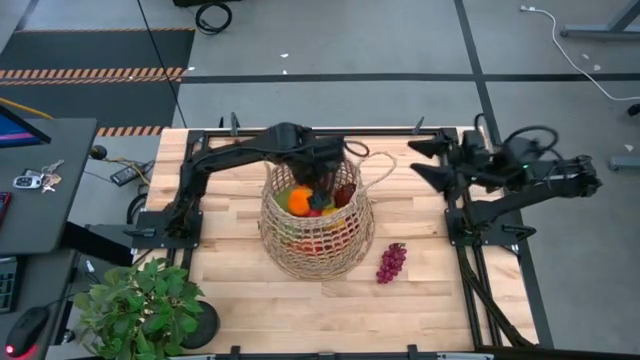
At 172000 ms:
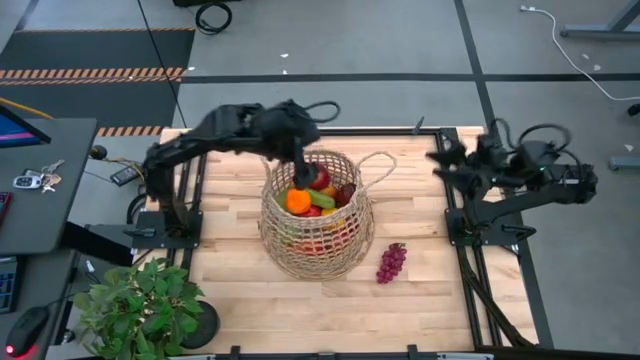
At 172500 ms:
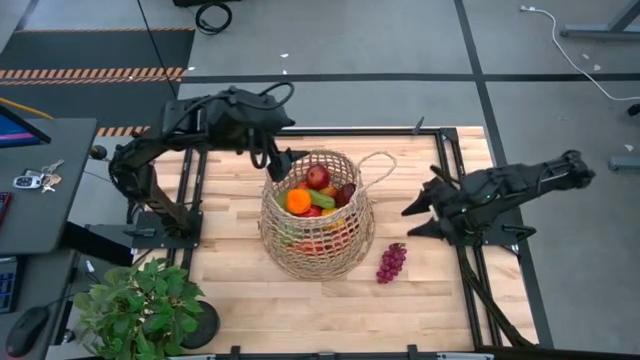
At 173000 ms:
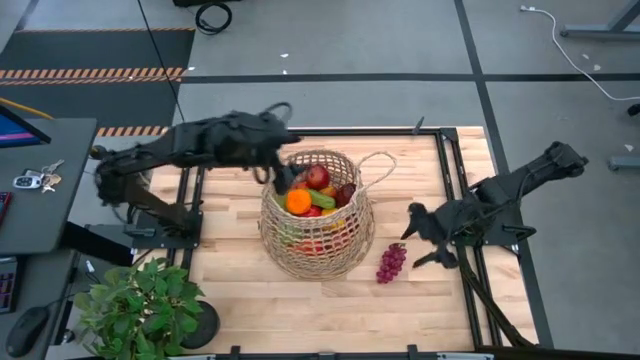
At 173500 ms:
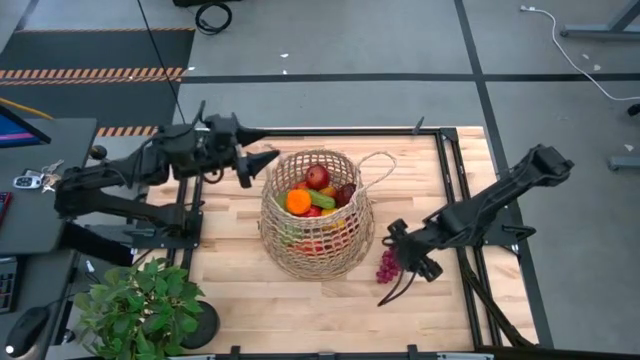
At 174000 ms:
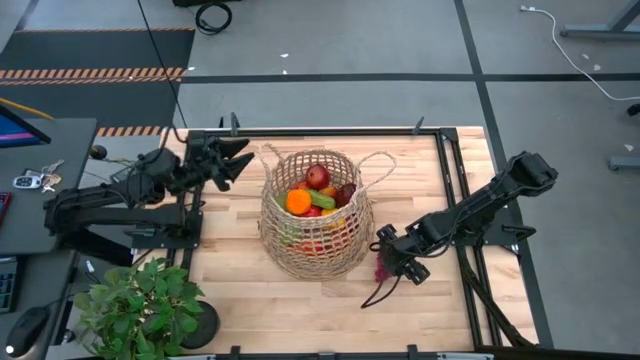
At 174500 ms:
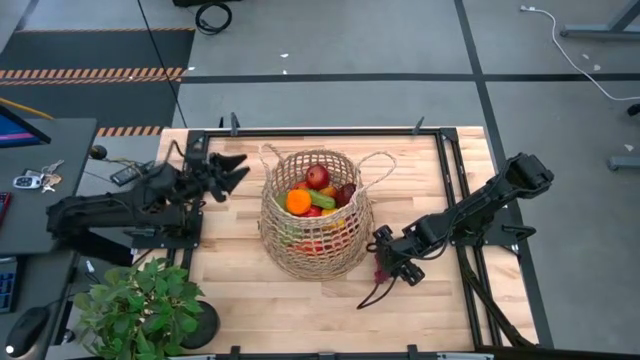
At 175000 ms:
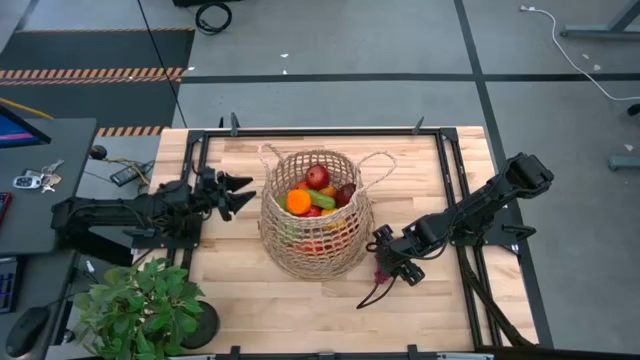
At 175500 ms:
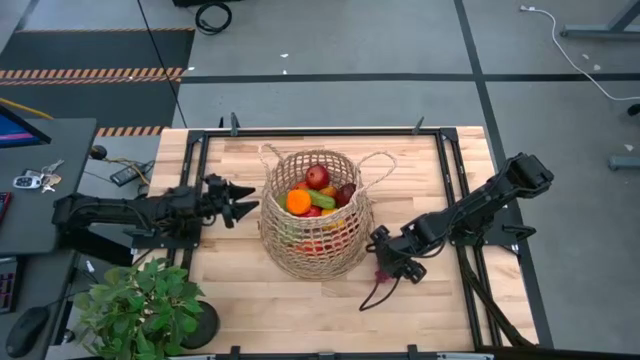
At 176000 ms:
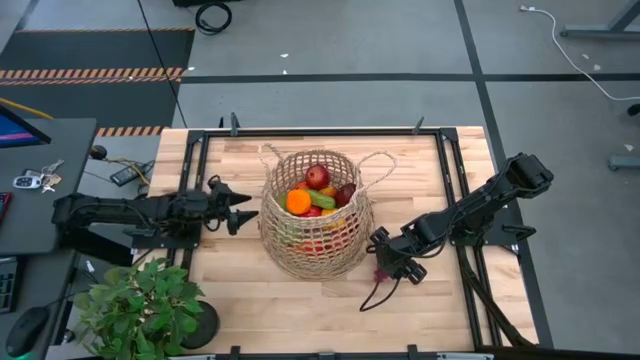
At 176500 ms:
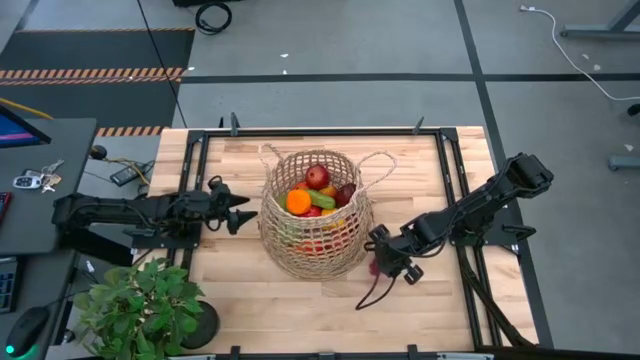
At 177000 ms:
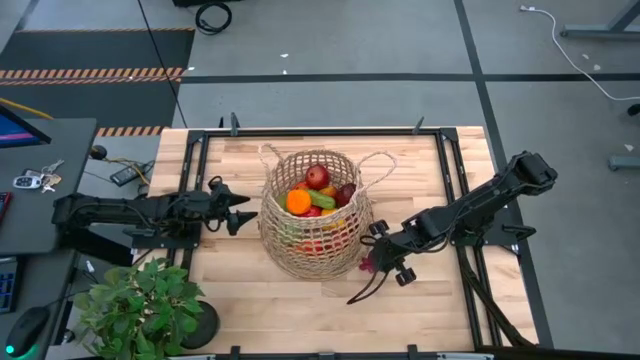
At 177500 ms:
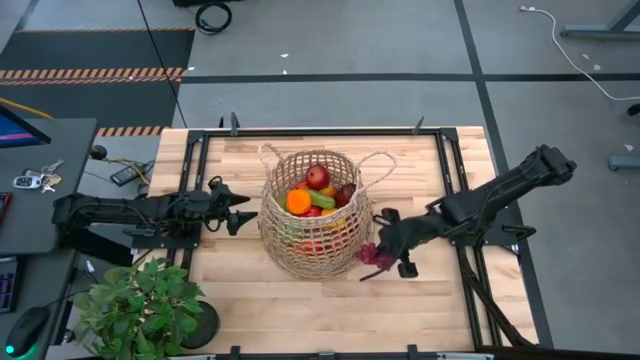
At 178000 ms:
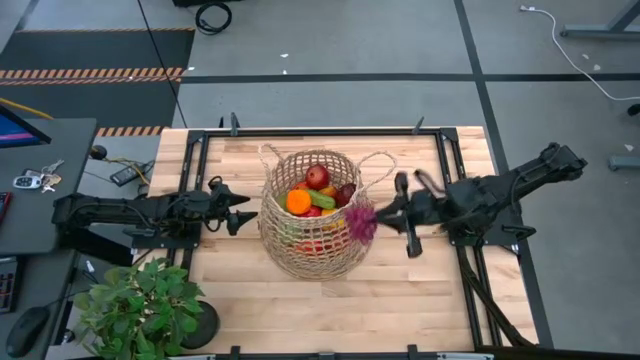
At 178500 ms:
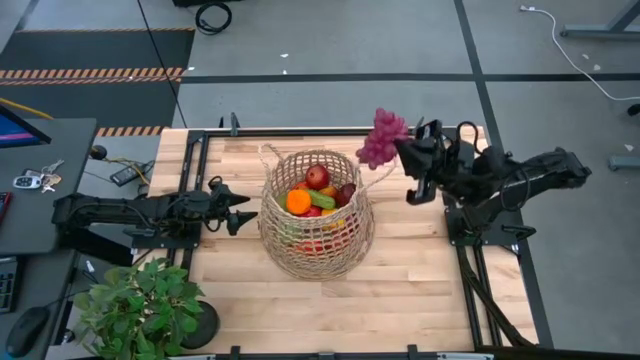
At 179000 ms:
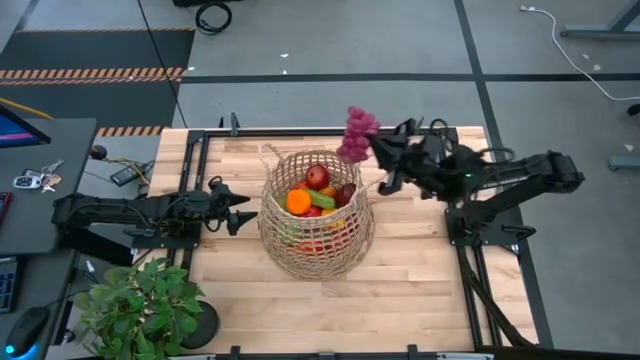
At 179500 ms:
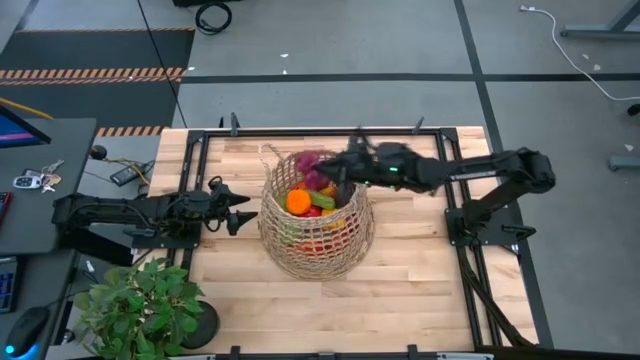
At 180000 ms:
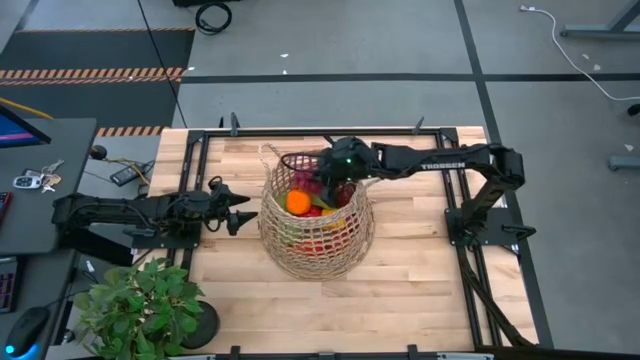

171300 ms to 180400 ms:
Task: Build produce basket
Put the red grapes into the basket

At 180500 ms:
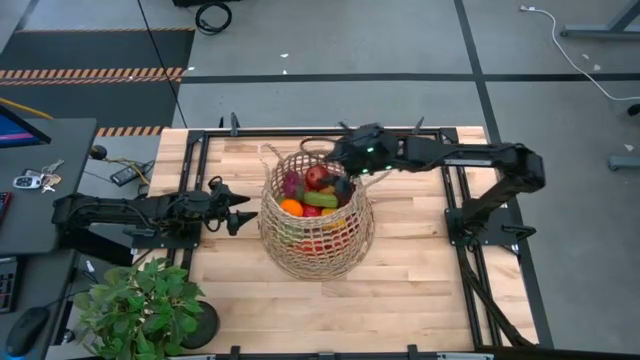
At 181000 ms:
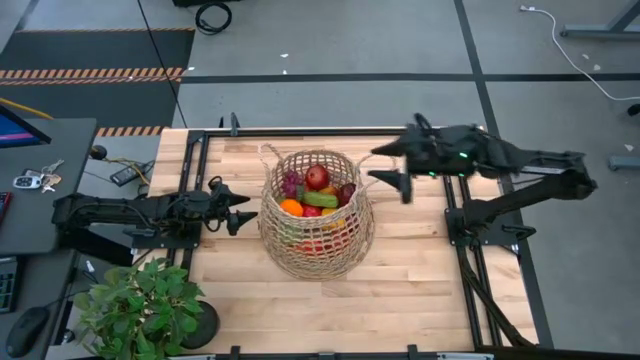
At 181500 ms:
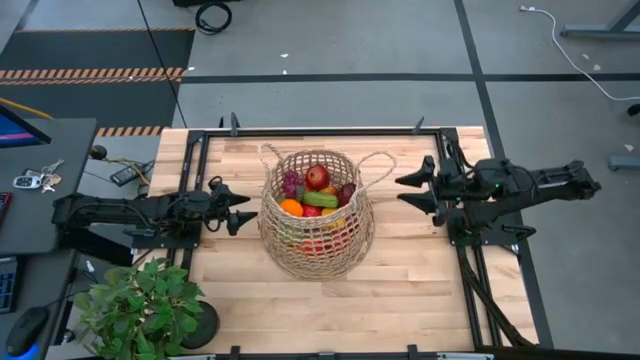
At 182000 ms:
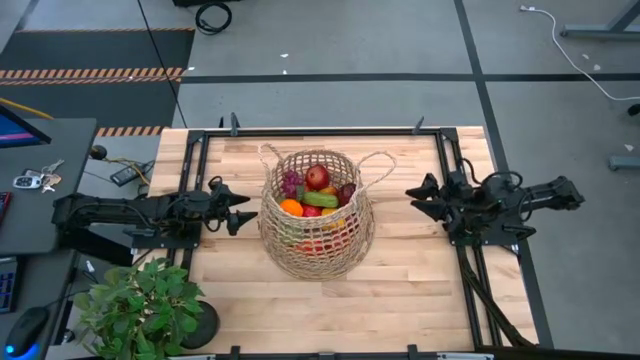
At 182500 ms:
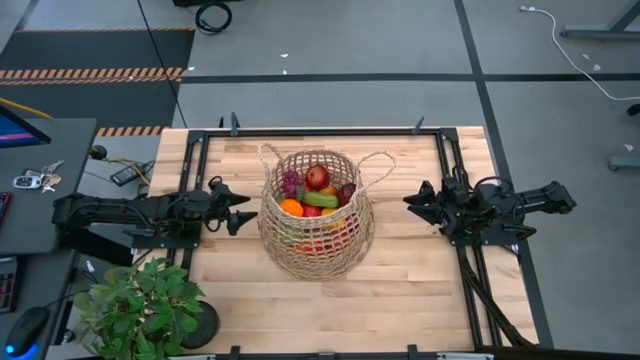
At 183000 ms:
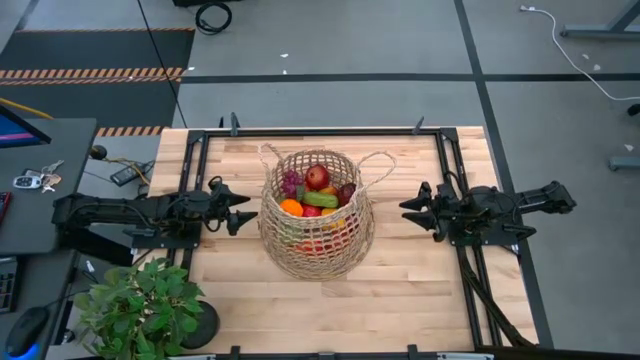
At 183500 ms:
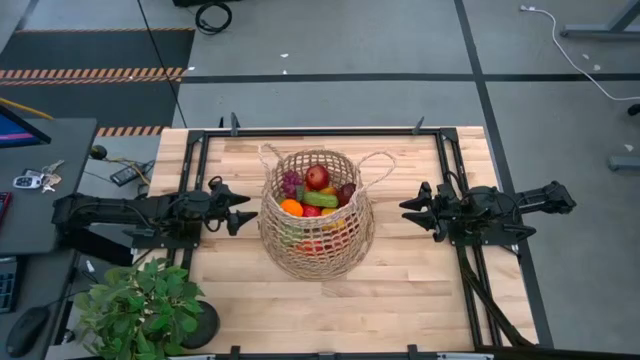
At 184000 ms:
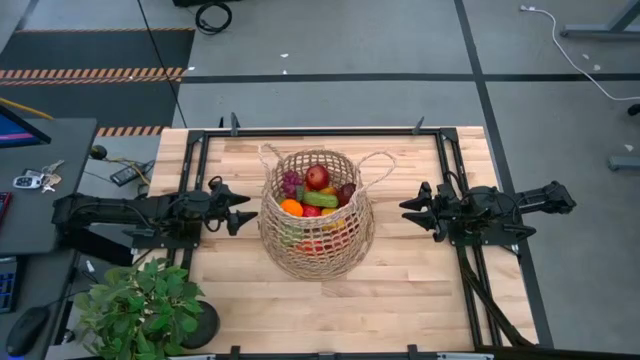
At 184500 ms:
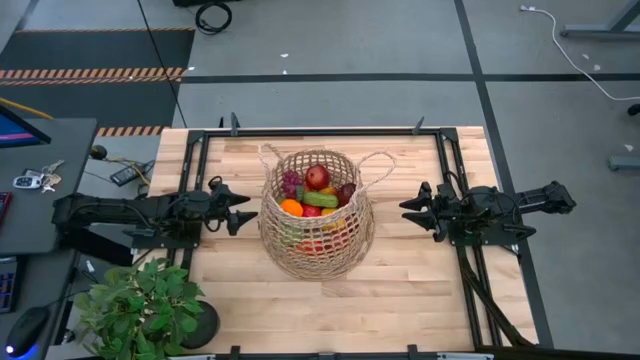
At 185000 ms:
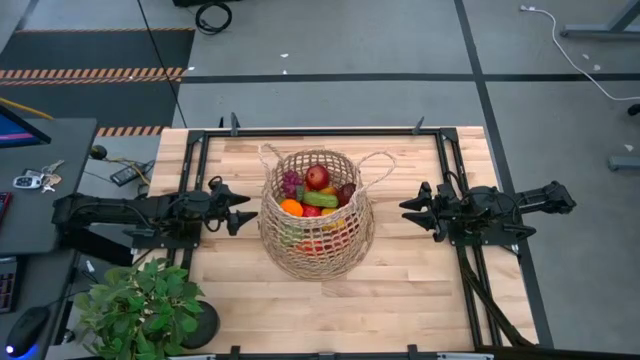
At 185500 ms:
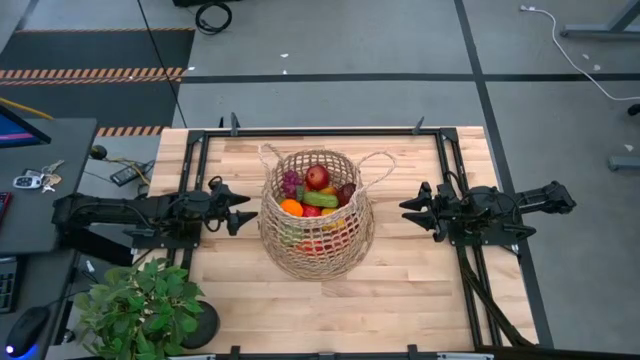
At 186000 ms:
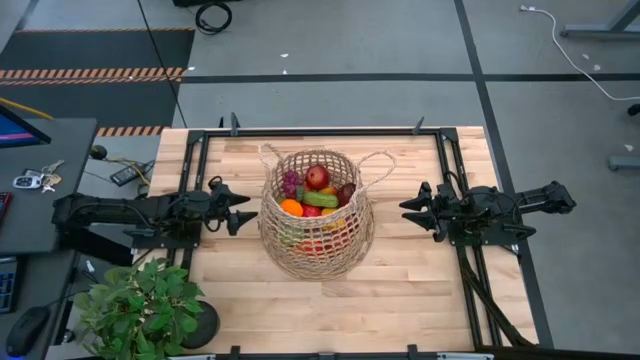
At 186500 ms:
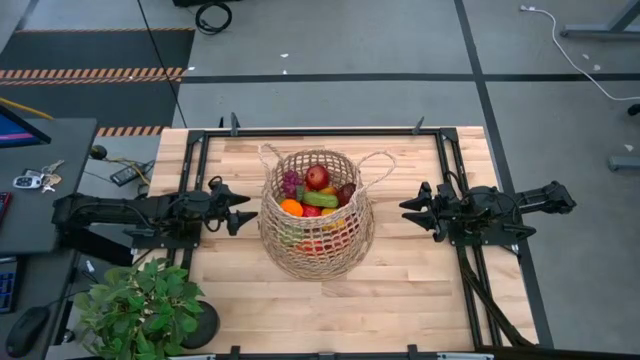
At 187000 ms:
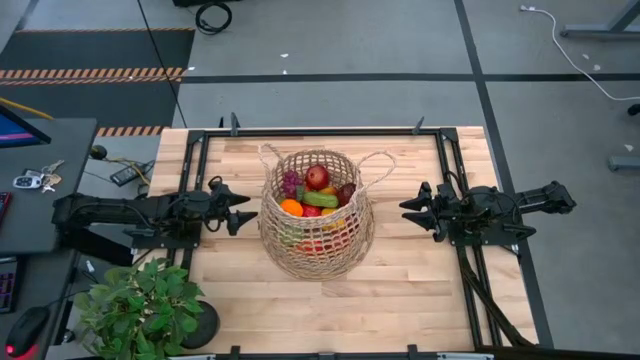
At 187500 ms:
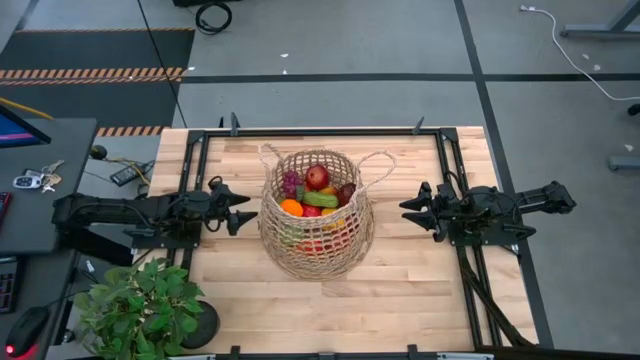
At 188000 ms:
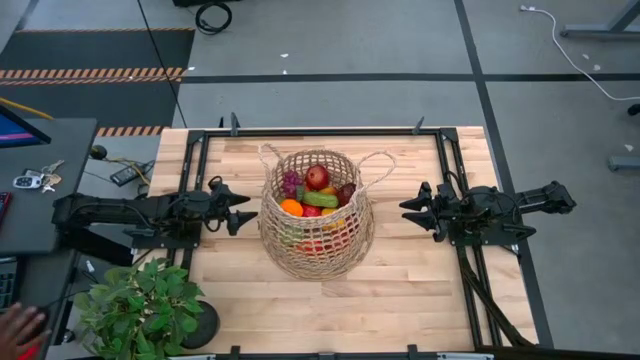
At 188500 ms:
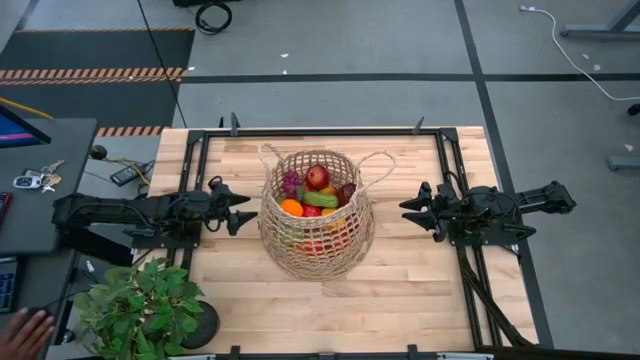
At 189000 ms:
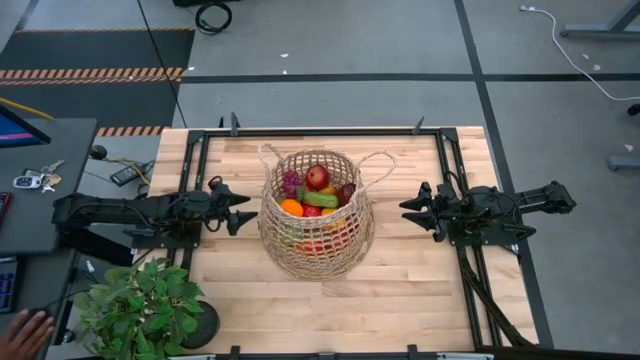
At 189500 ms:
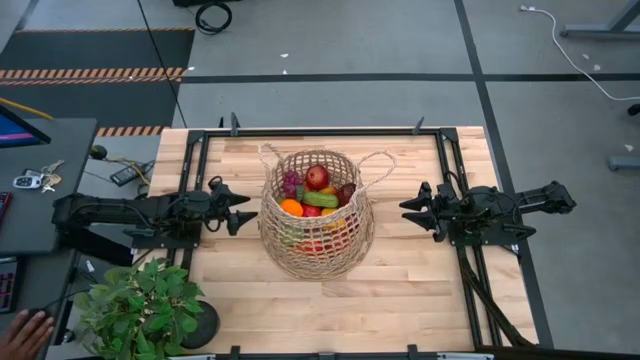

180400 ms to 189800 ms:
Return to Home Position

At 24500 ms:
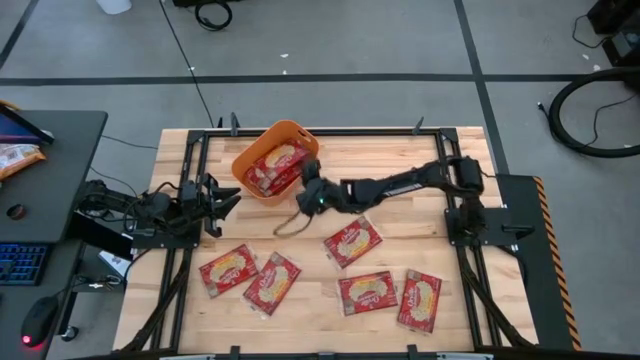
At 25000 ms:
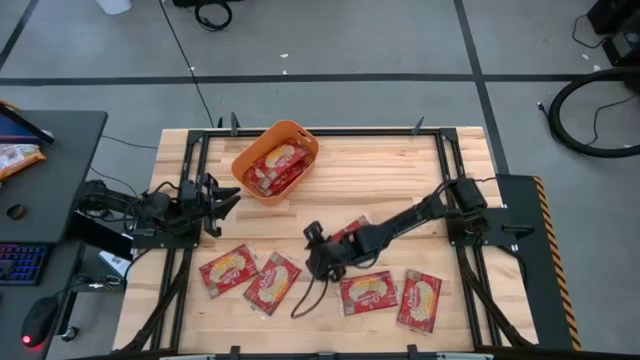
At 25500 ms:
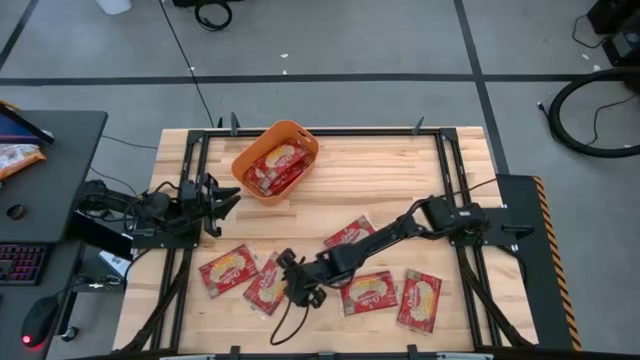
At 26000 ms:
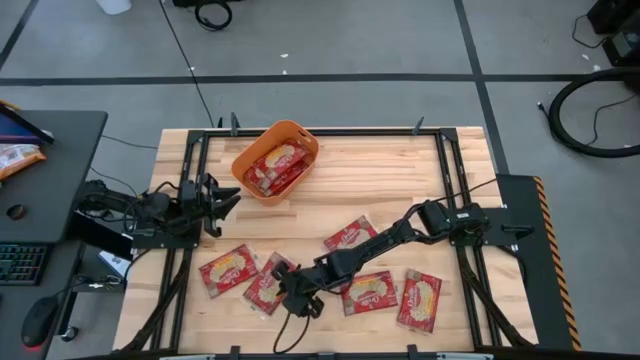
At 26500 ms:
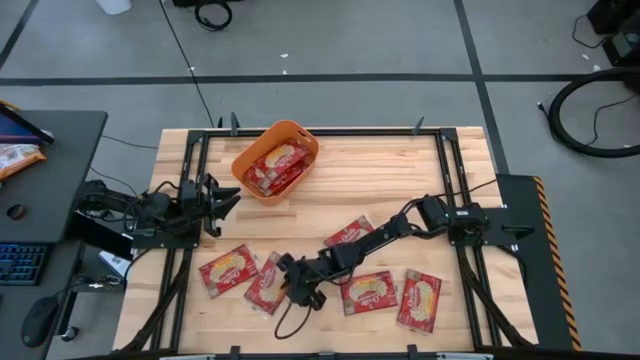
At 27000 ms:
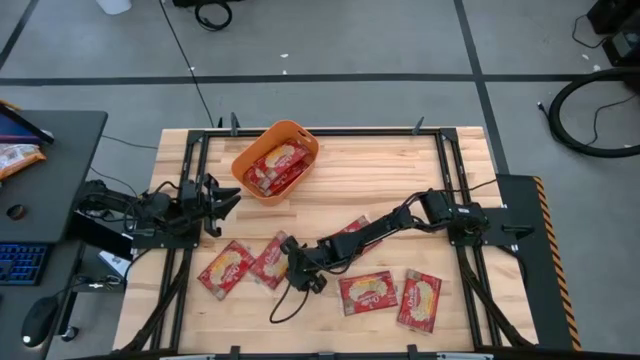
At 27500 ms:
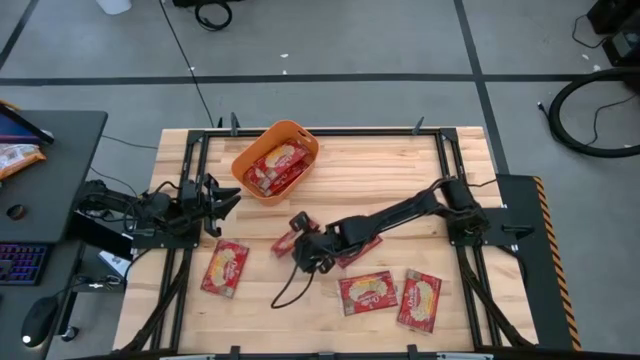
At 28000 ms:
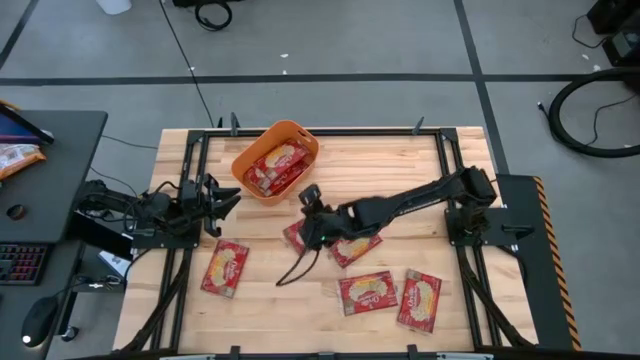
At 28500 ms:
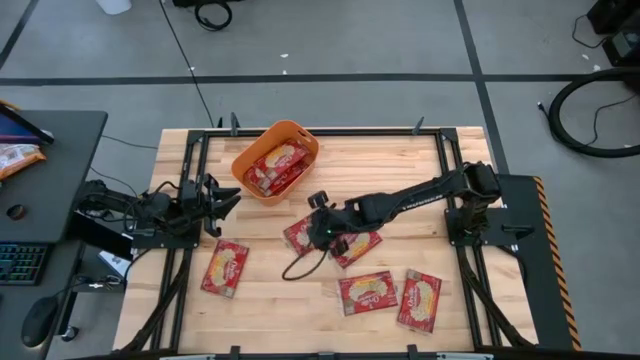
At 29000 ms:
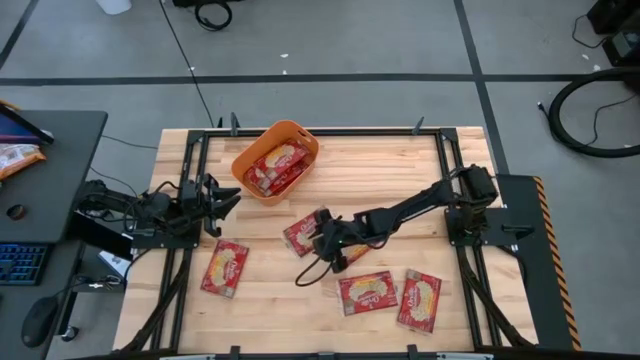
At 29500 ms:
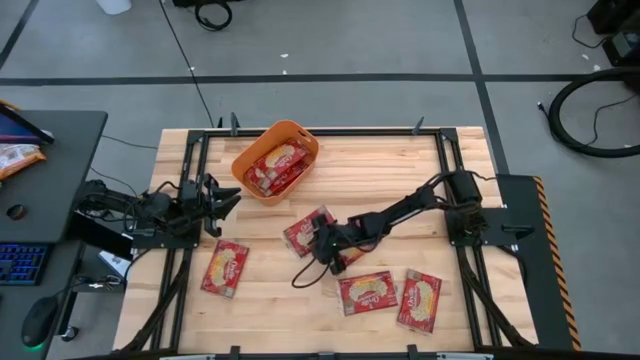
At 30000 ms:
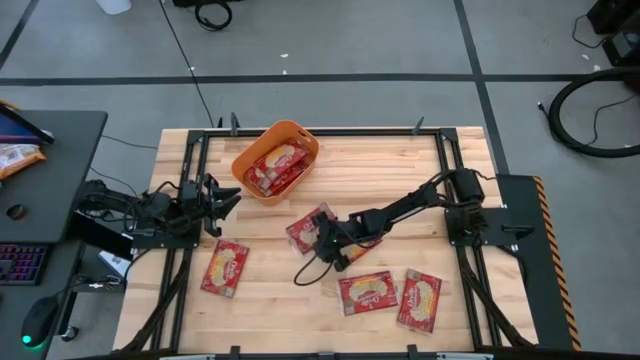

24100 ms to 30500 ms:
Task: Sort popcorn bags into baskets
Put the red popcorn bag into the orange bin
